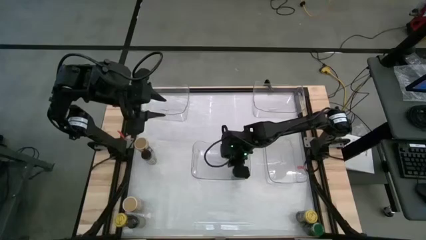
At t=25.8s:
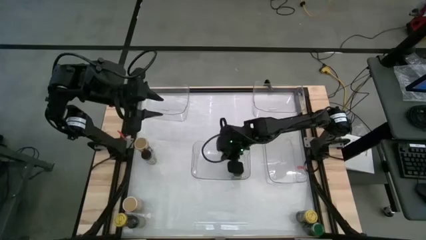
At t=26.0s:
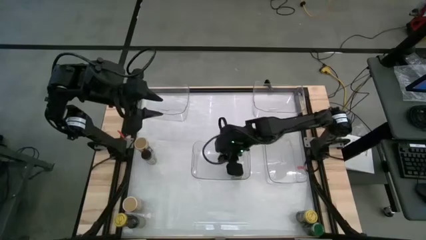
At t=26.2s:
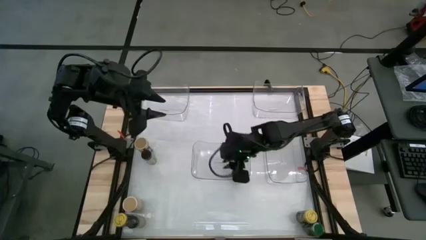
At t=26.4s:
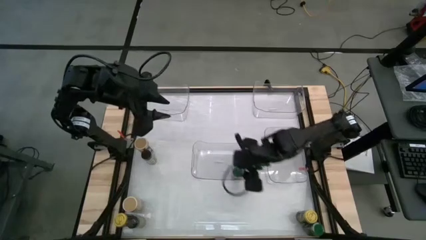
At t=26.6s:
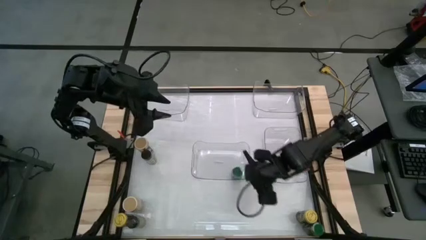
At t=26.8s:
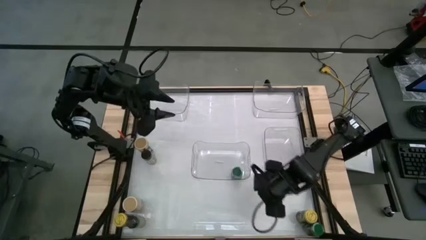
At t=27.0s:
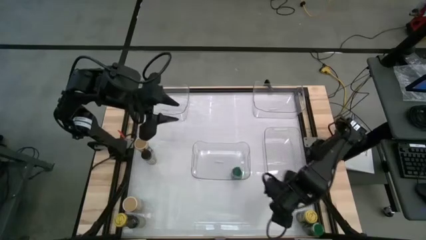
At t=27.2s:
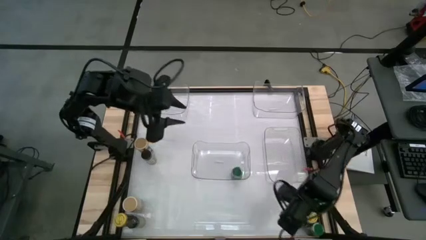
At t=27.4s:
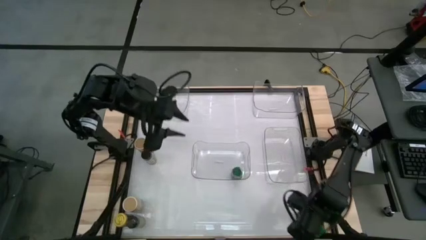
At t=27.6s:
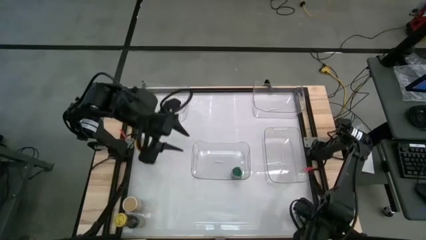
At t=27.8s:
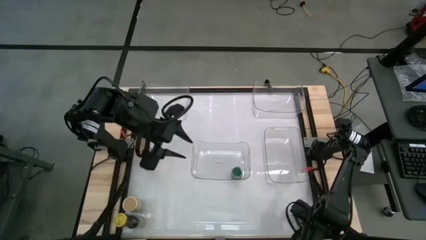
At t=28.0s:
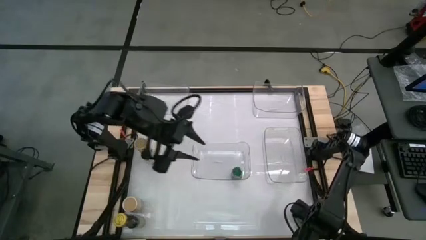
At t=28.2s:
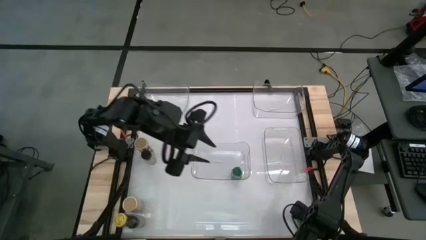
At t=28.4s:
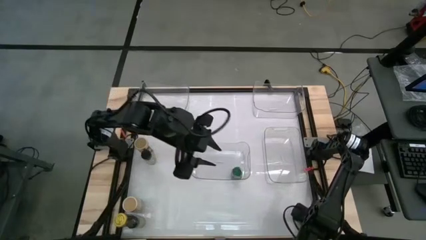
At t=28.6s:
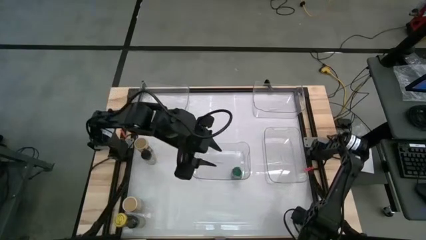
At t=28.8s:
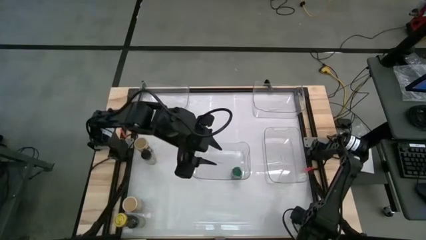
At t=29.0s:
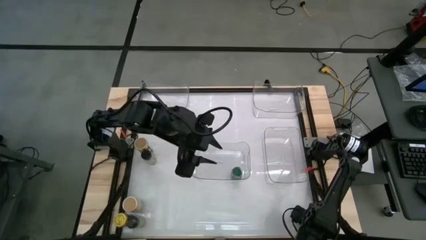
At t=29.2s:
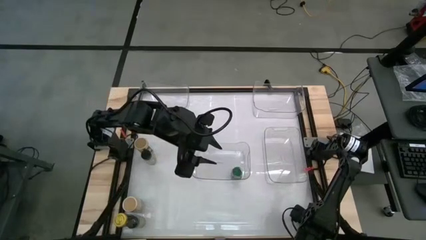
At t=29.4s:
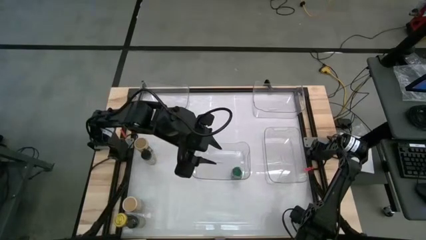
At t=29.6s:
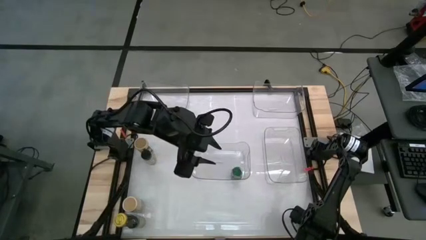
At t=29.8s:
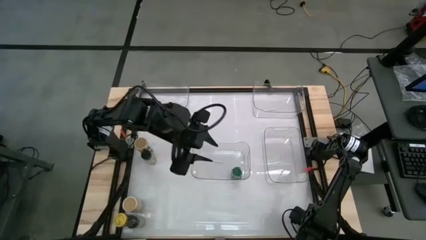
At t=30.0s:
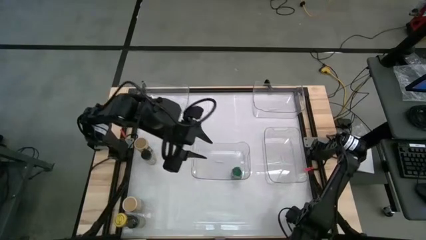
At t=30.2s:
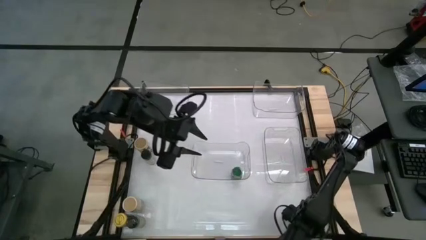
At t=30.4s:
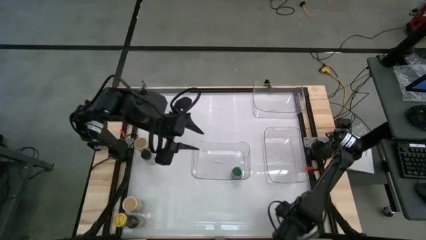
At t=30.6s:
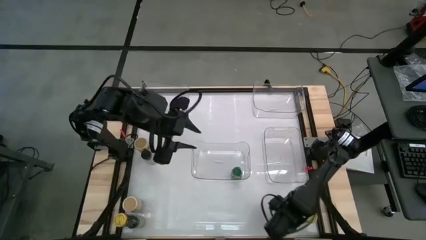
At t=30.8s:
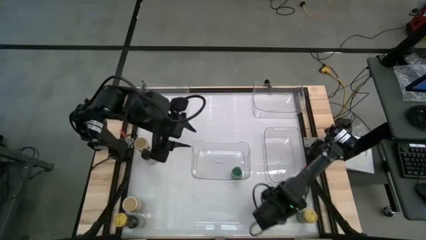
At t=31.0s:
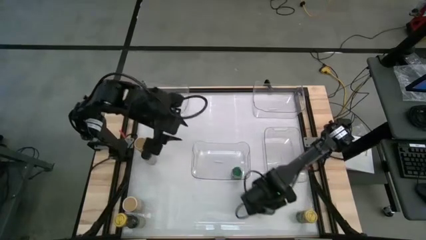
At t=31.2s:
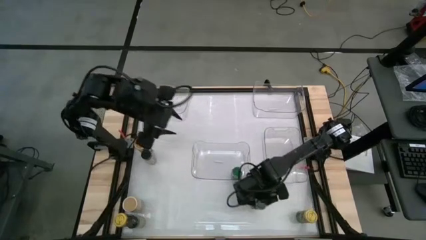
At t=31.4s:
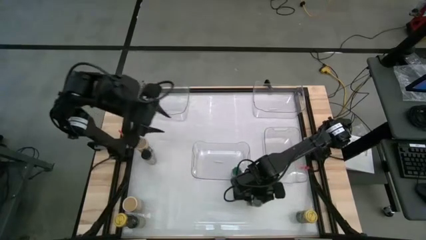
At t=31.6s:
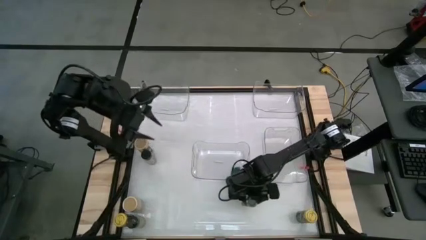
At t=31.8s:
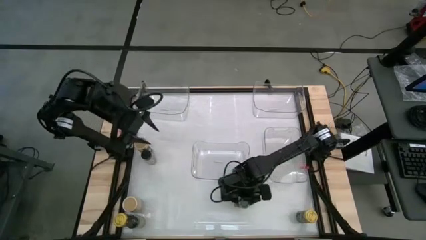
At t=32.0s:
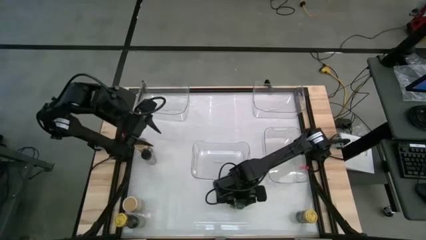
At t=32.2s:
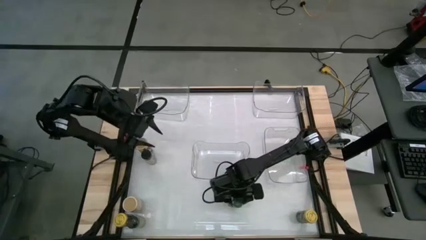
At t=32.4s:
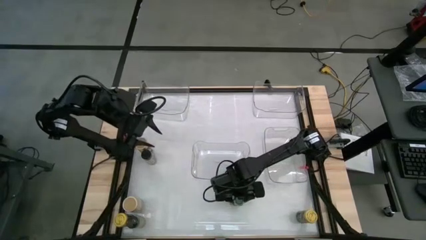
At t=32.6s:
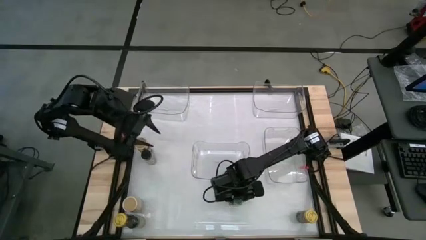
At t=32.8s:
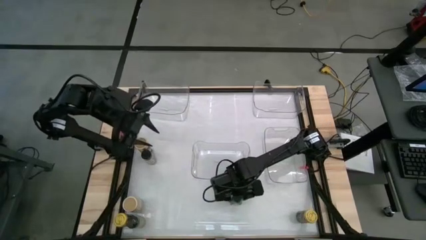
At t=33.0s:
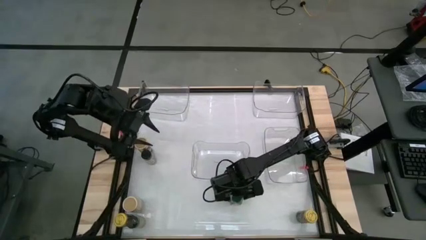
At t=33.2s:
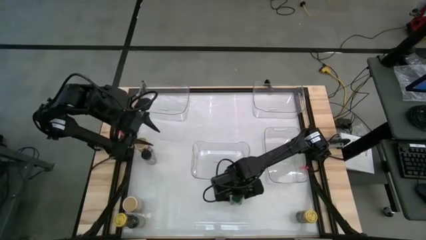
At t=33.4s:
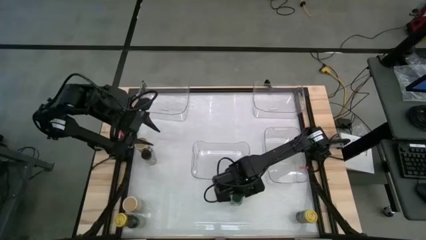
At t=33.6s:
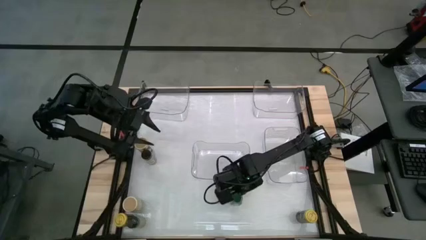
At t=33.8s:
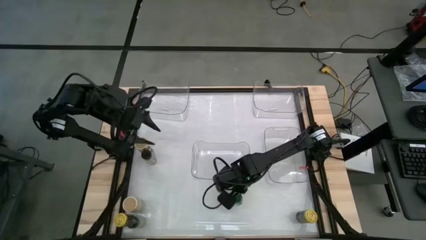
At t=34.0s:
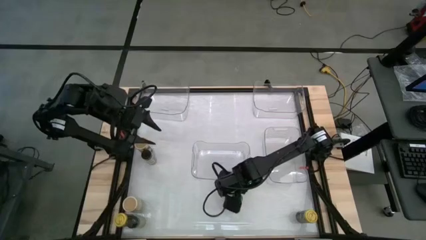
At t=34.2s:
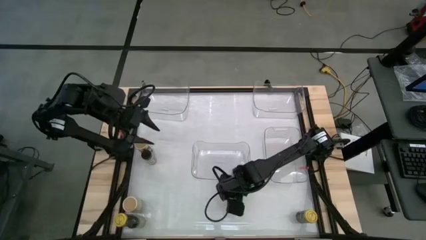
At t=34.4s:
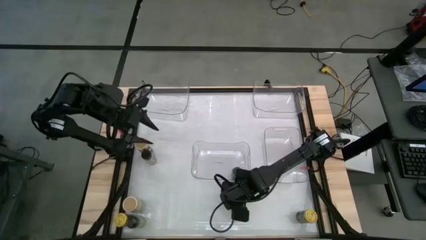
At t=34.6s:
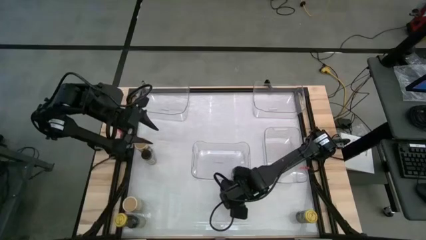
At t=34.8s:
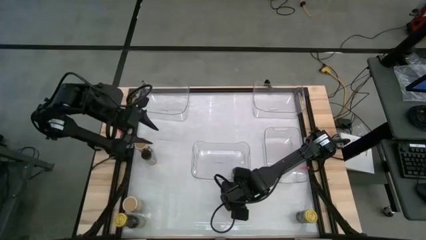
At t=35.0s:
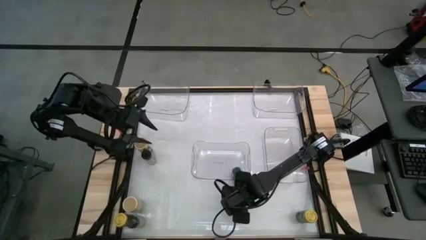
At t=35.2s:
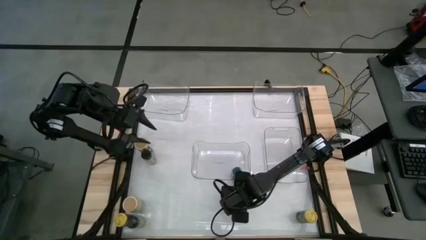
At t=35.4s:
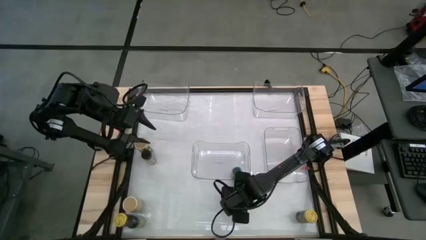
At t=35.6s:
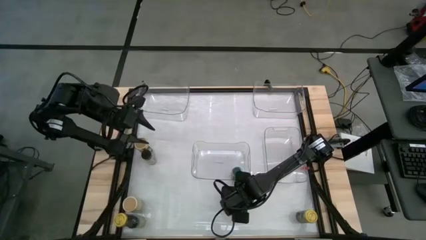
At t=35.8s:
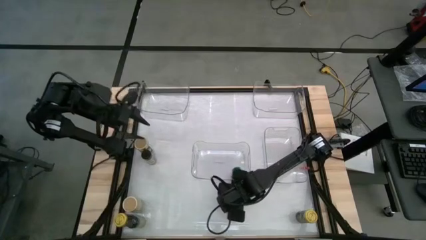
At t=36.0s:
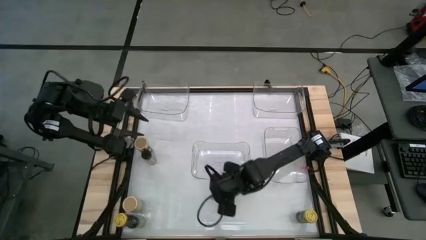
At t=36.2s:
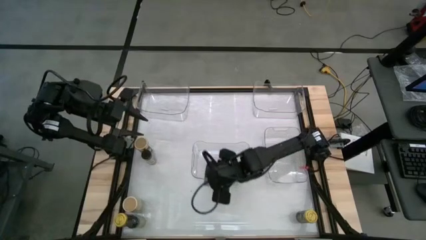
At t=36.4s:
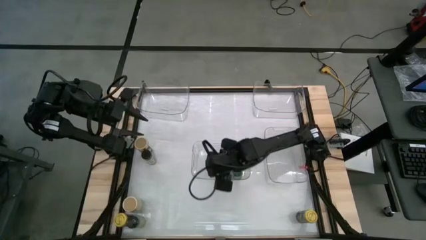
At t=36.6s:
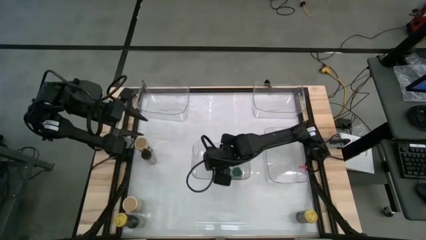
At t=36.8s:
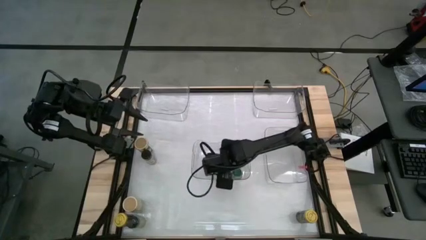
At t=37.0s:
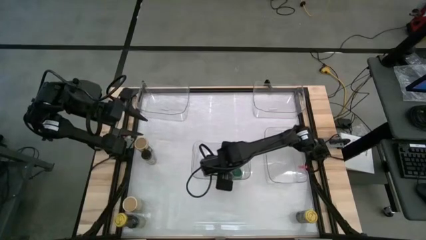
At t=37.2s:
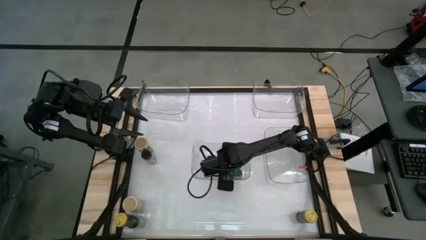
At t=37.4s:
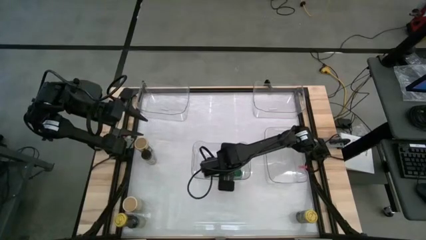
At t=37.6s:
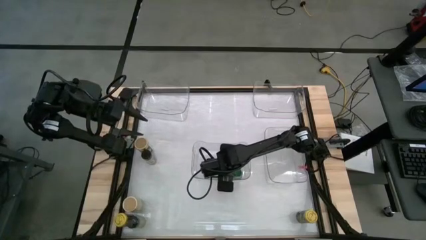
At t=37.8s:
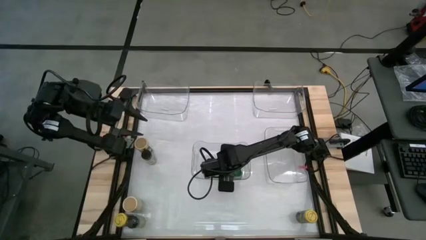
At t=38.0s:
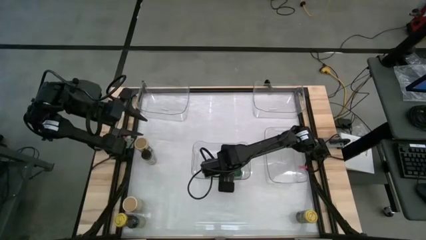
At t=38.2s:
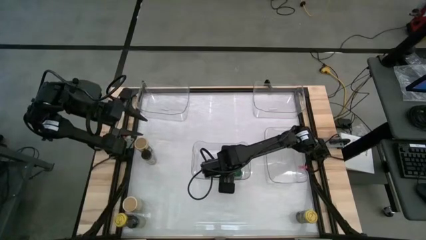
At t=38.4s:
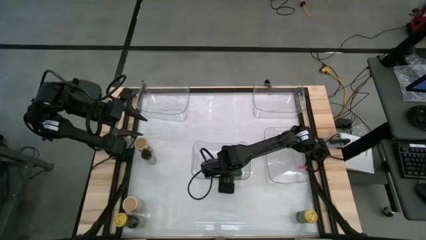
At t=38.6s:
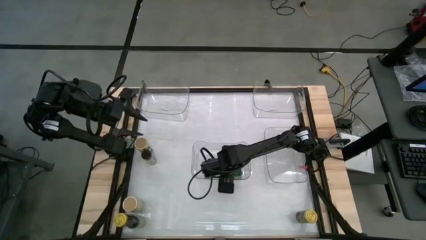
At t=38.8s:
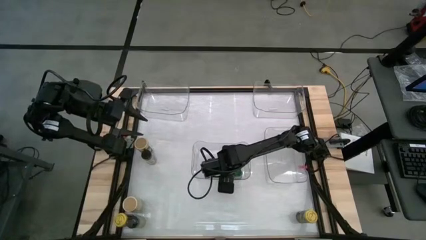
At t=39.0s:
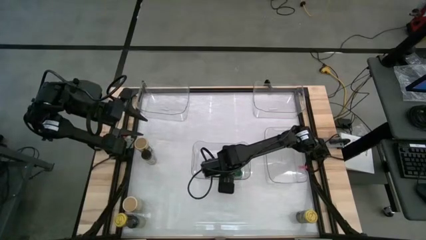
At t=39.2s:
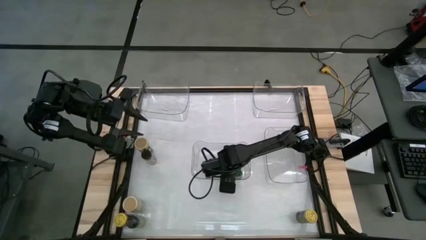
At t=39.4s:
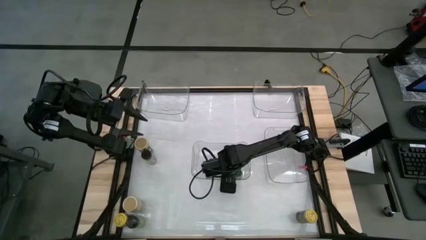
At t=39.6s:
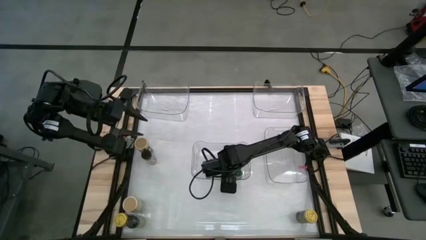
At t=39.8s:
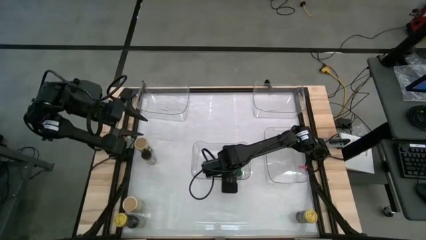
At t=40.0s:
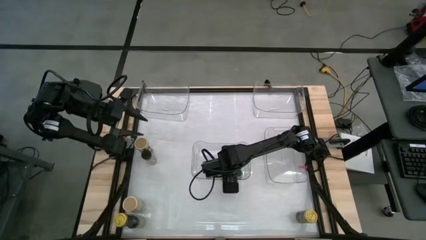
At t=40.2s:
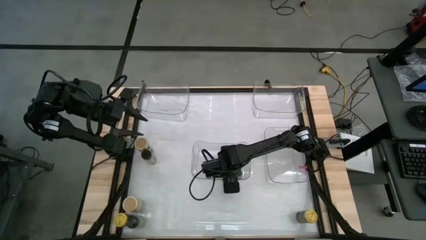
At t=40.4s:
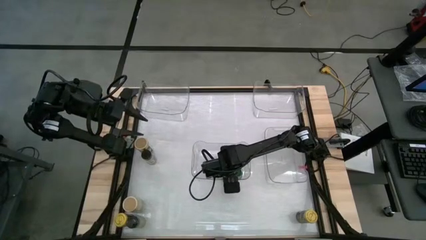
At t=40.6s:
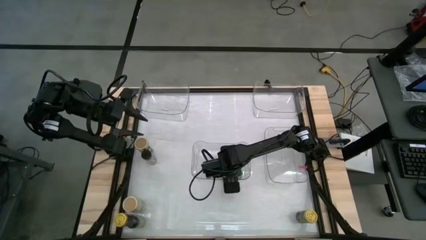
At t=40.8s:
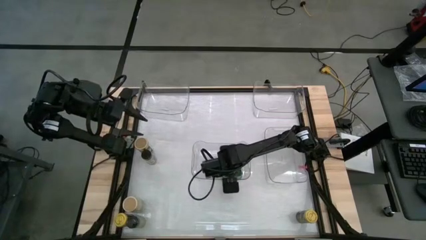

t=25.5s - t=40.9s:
Task: Sort spices by type
Put the green seasoning bottle into the bottom left transparent bin

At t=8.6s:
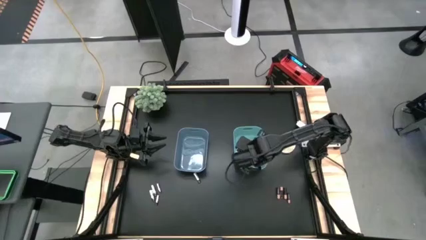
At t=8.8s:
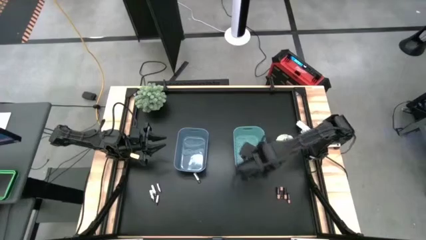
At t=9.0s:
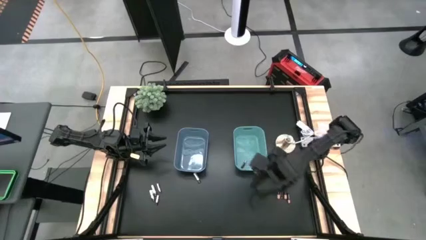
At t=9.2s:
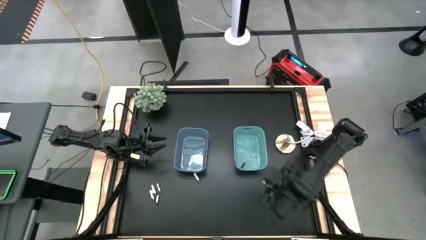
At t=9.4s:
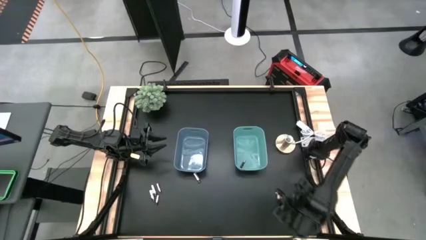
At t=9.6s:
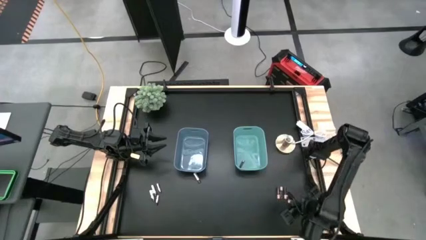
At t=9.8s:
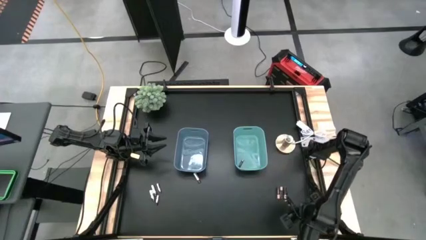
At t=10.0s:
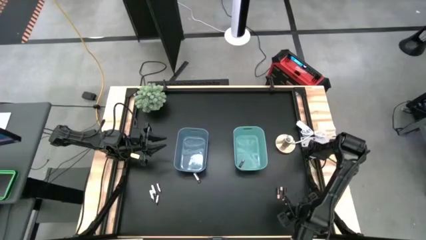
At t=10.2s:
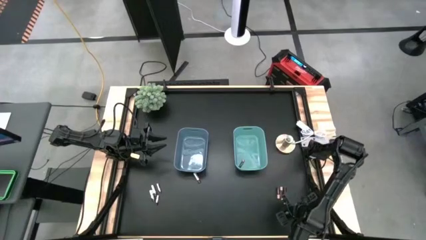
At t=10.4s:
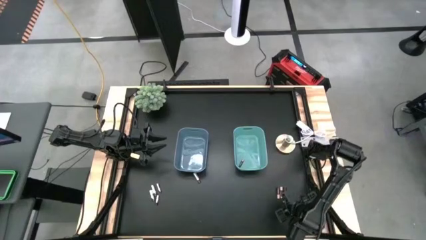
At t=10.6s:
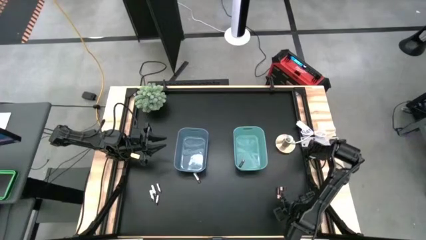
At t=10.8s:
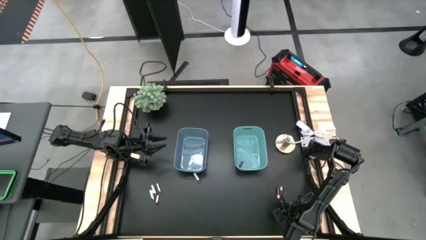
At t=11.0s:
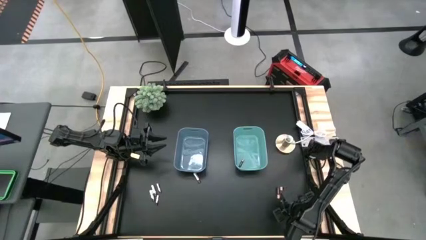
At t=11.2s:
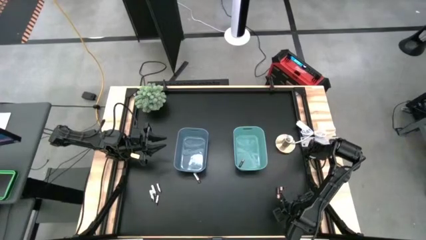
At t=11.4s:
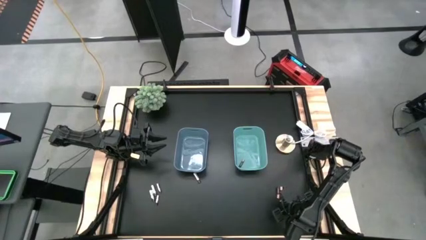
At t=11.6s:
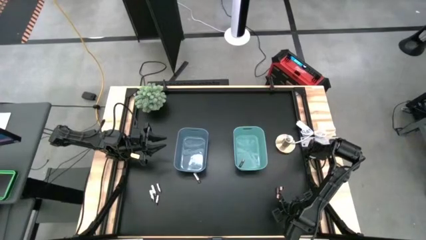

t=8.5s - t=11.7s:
Task: Sort batteries
Put the small black battery into the green bin
